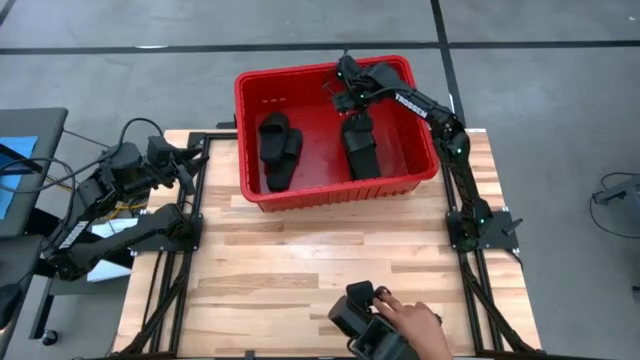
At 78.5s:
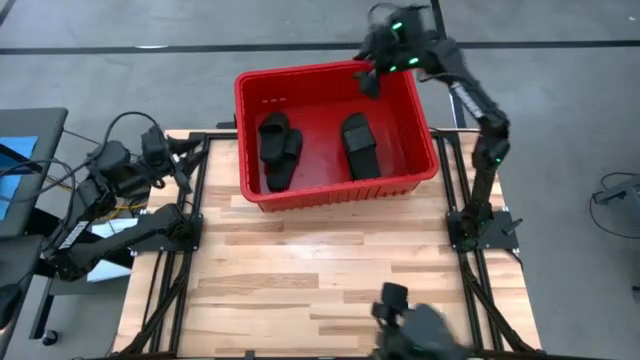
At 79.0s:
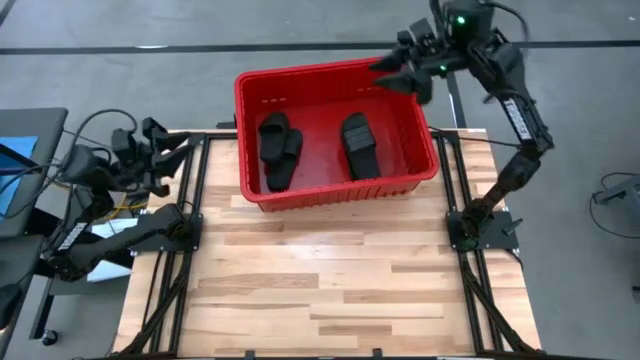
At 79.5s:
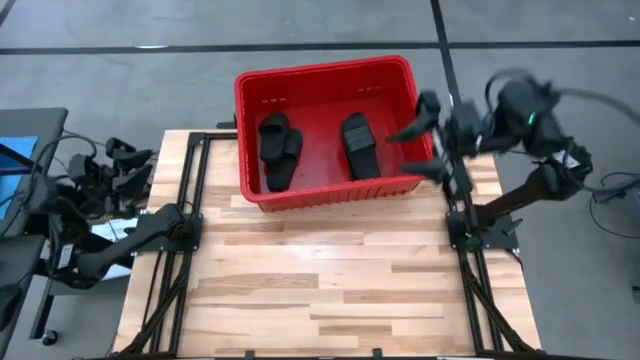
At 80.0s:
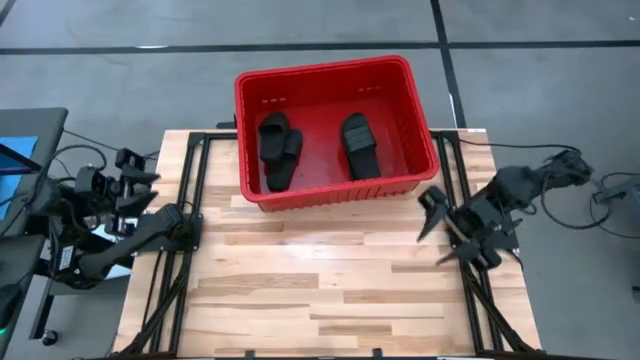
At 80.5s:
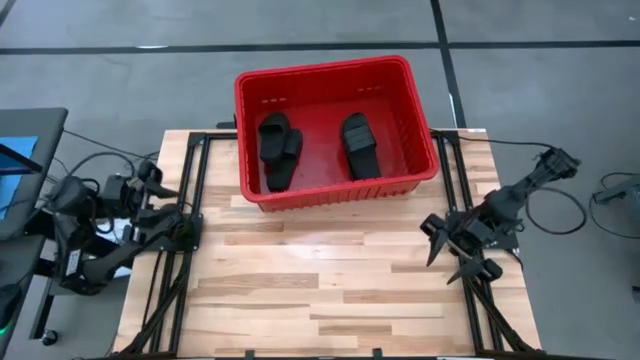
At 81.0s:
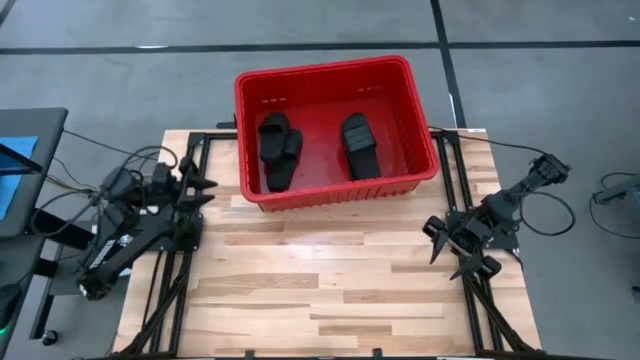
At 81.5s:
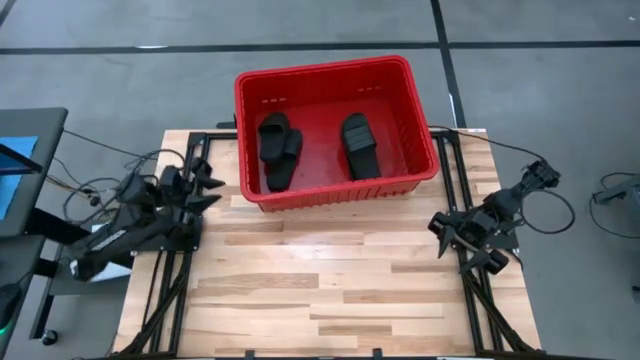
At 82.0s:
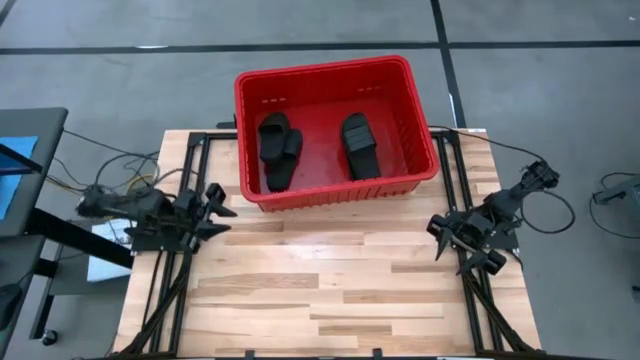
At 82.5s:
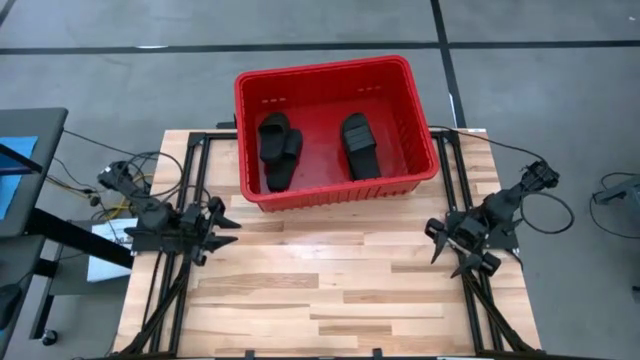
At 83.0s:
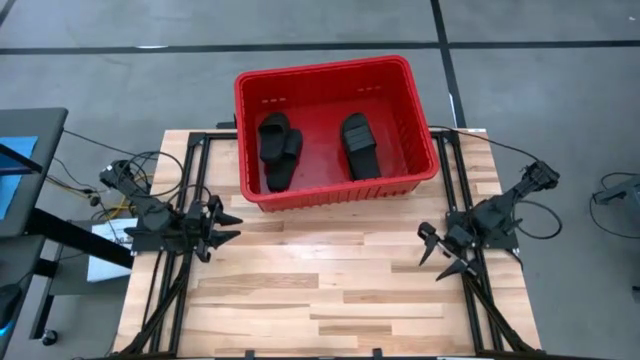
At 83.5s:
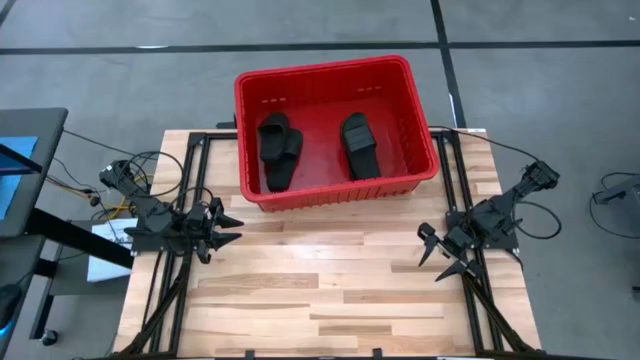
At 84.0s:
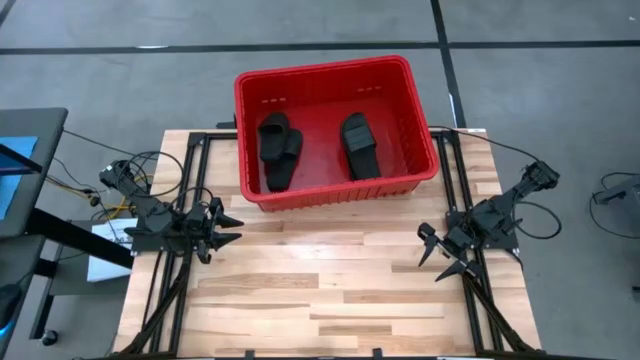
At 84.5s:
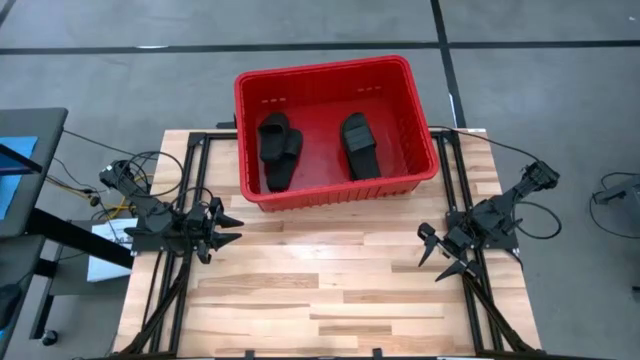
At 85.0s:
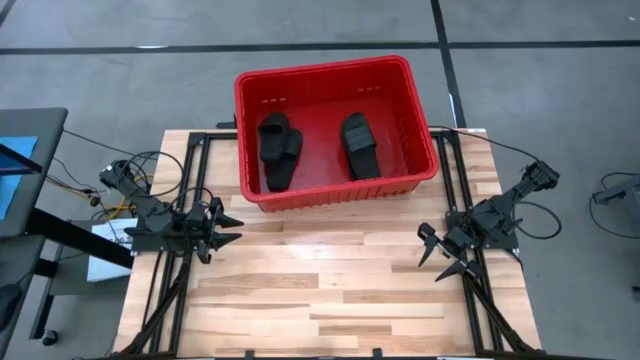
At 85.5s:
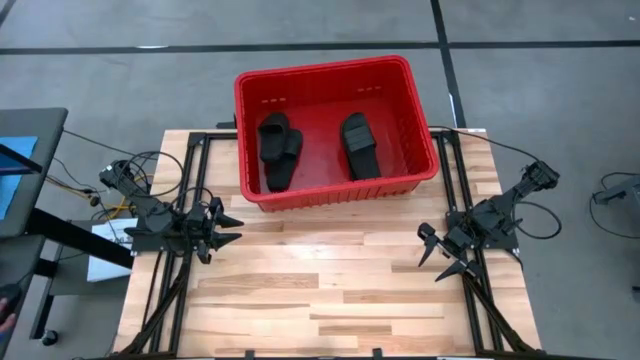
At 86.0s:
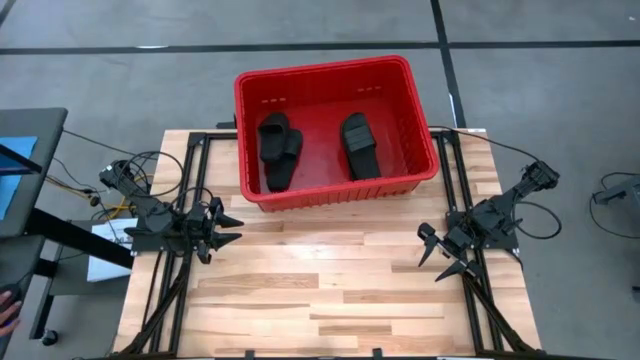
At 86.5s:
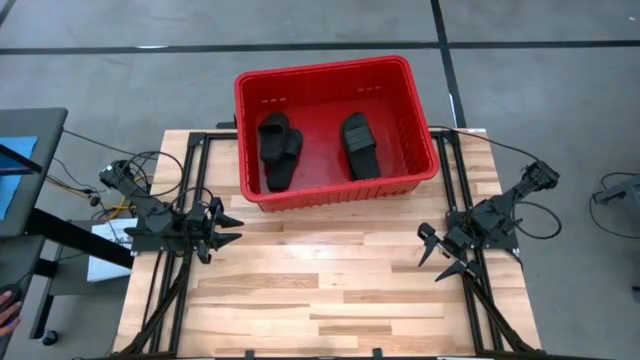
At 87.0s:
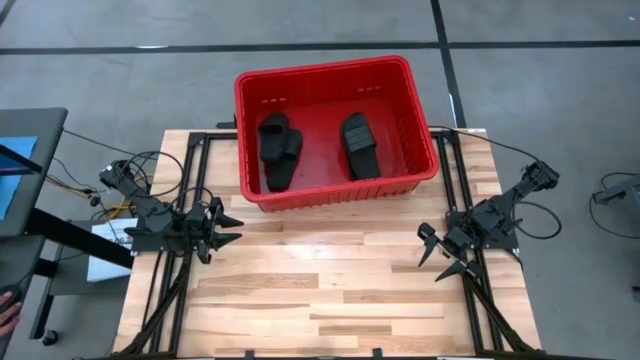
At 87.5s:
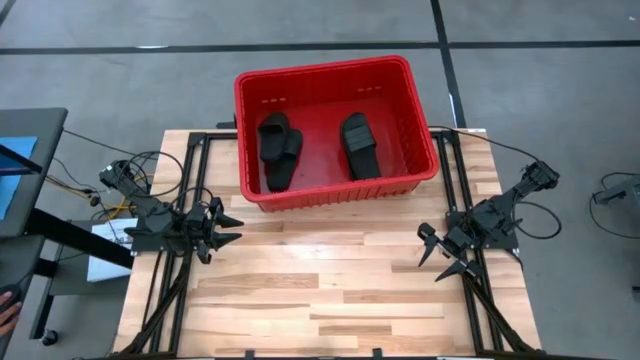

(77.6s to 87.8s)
Task: Pick and place slides into bin
Return to Home Position

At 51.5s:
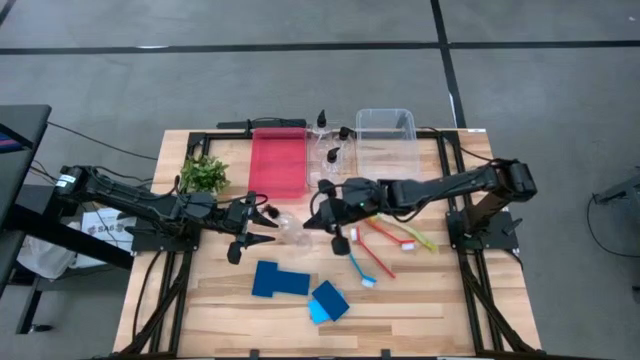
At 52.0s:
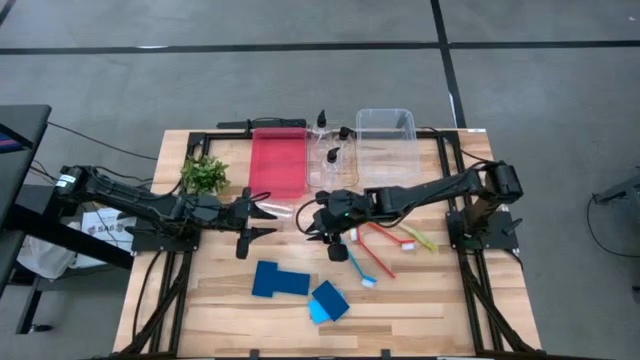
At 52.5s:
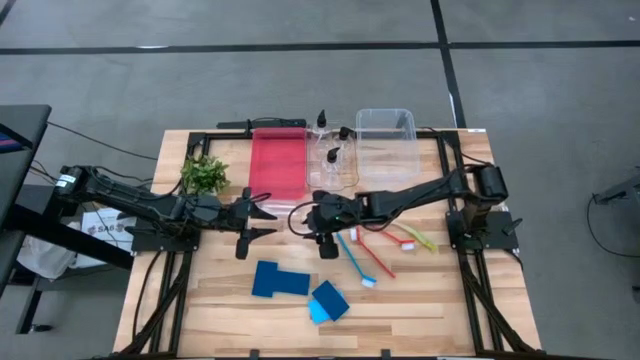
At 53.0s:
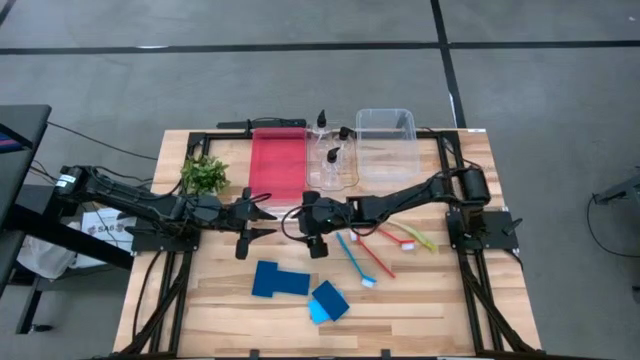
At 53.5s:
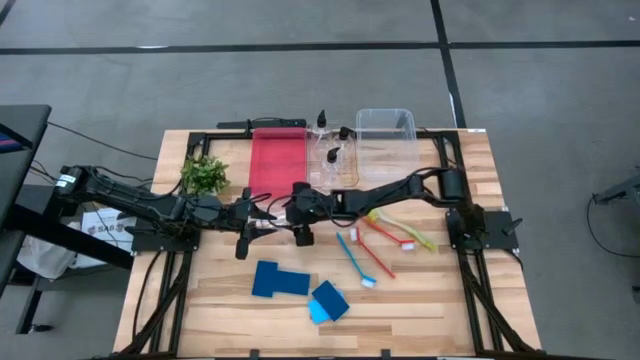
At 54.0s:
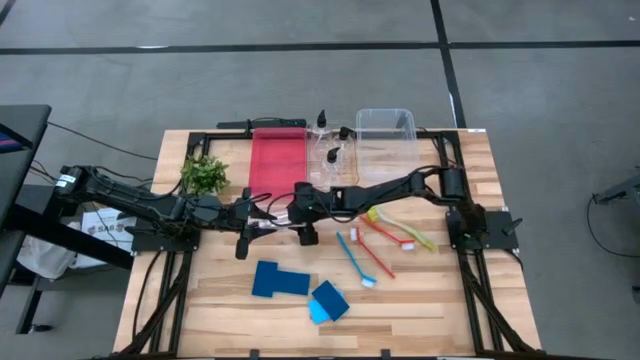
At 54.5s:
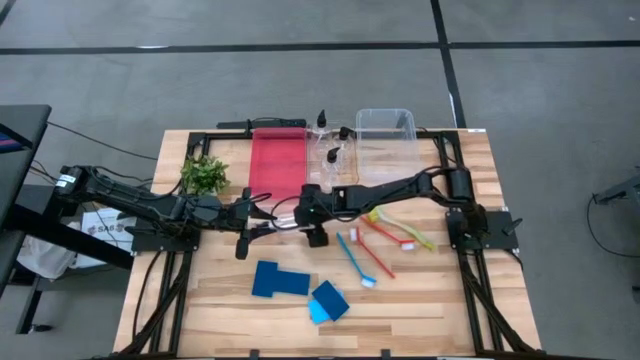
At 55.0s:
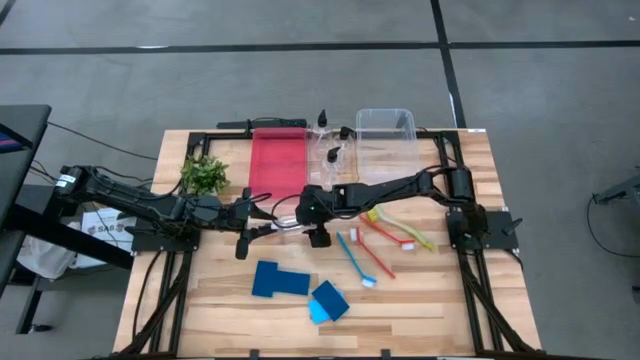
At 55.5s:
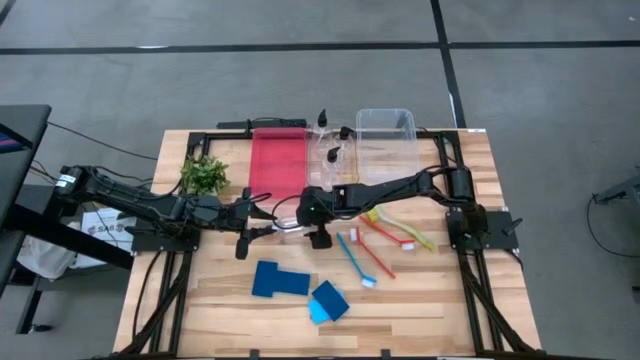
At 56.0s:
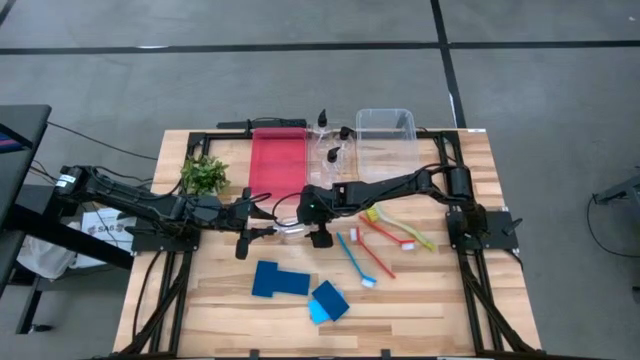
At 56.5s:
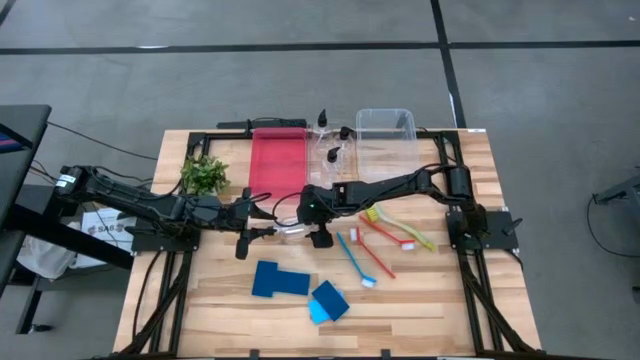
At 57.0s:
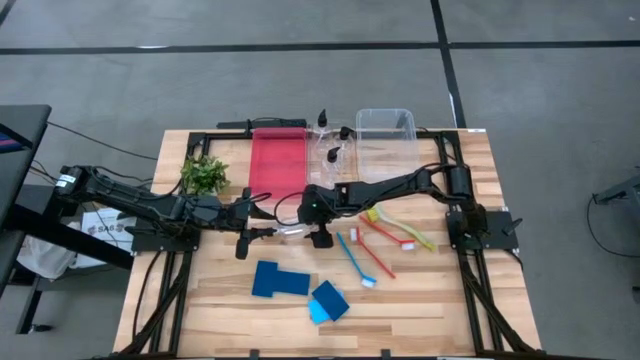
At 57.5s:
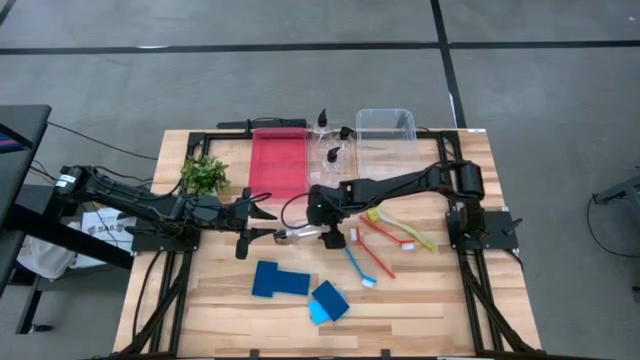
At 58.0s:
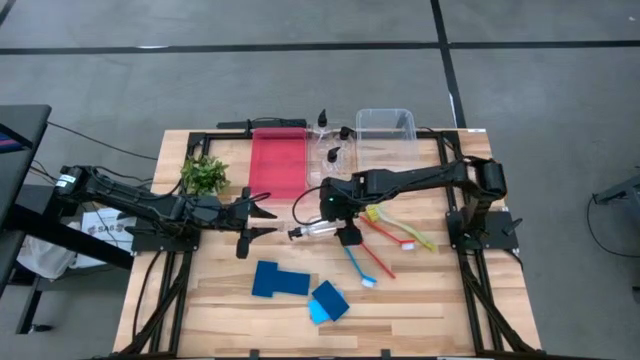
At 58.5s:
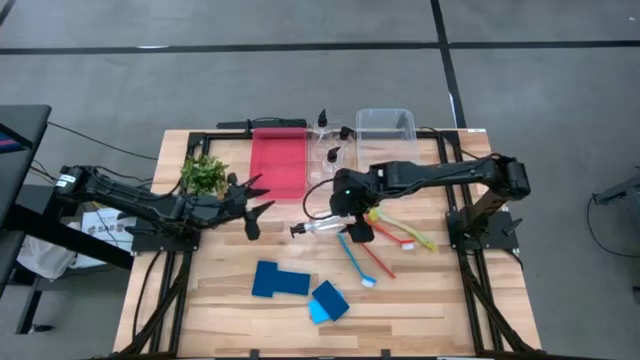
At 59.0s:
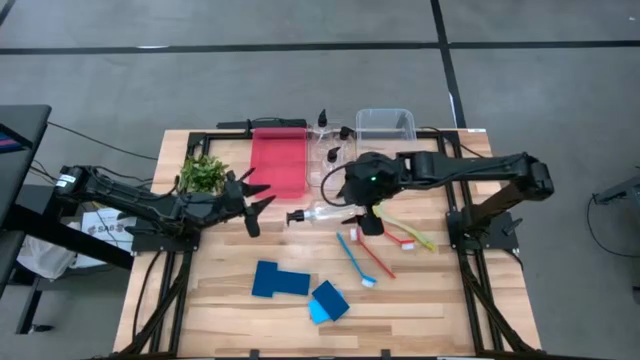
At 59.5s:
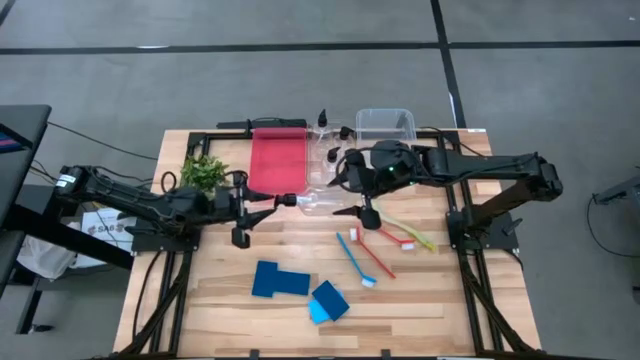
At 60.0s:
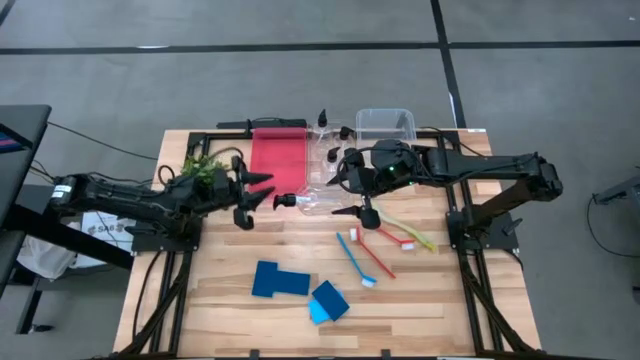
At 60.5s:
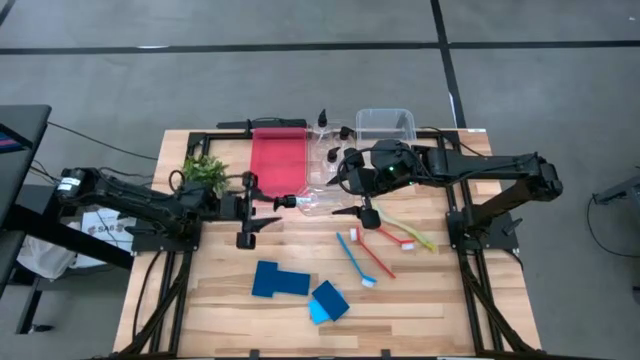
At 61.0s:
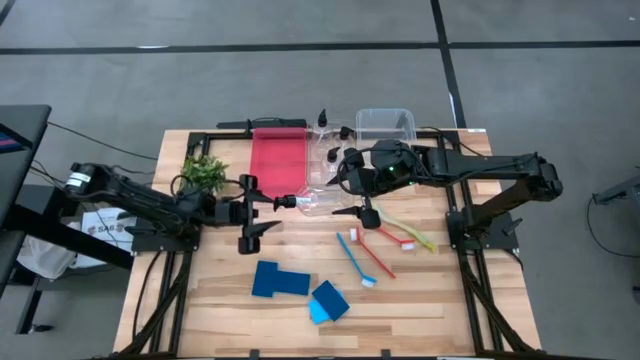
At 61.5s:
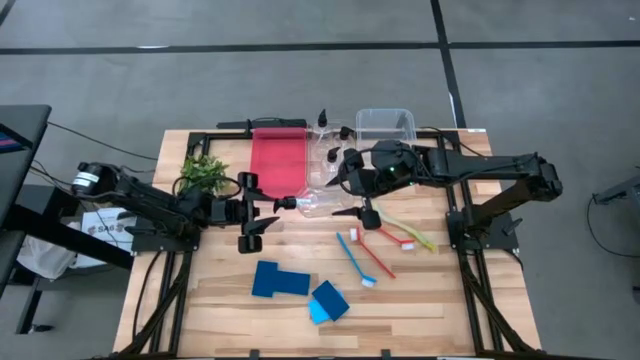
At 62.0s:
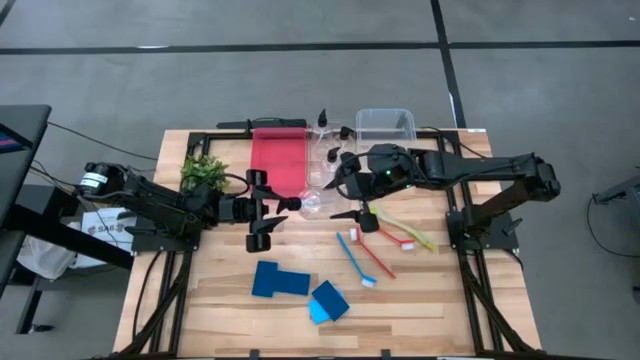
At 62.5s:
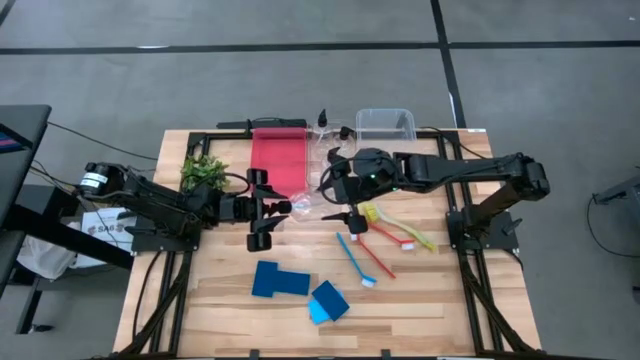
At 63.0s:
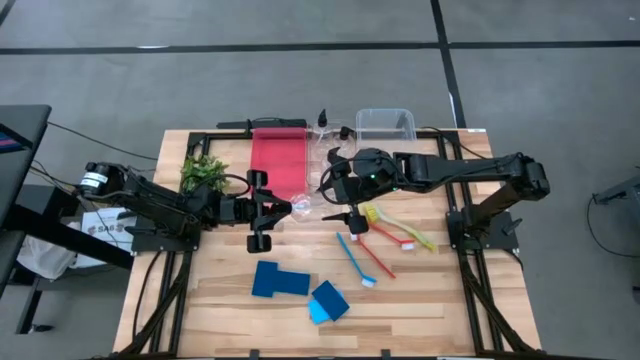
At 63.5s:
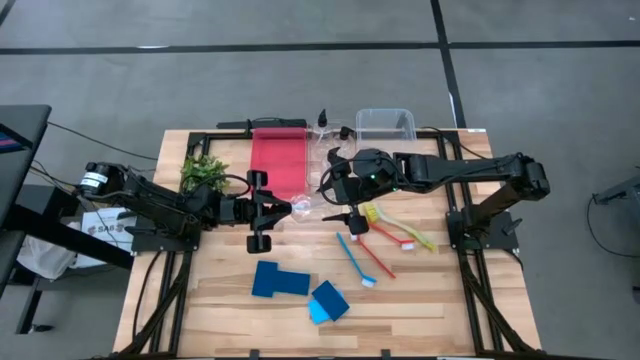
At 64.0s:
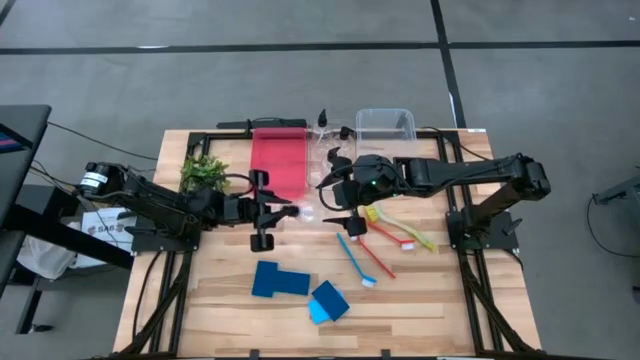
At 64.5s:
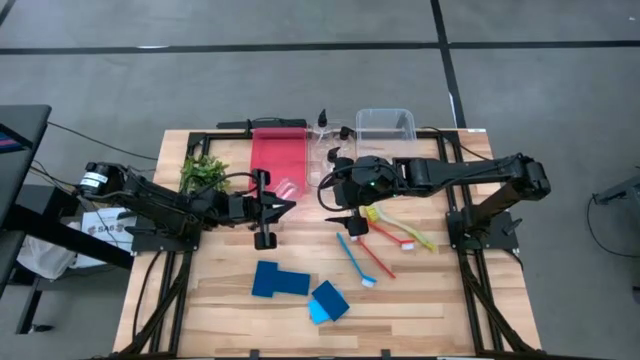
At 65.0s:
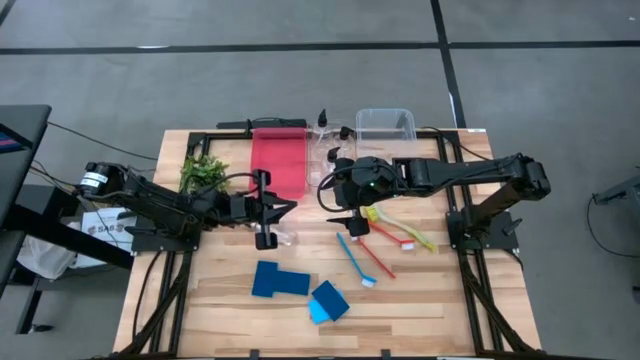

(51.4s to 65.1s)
Task: Pick & Place Kitchen Sink Supplies
Put the soap dispenser into the left transparent bin
